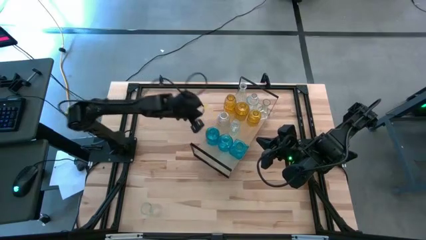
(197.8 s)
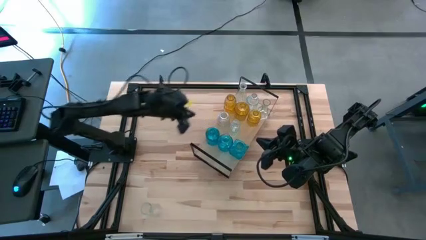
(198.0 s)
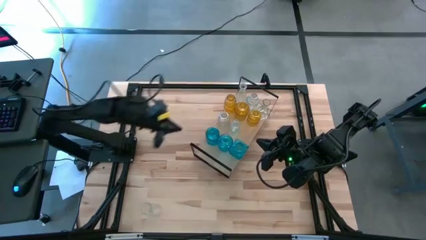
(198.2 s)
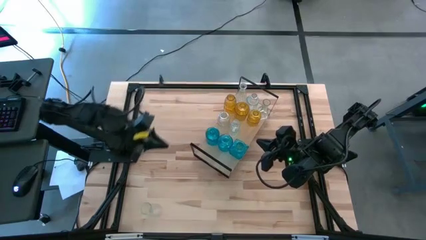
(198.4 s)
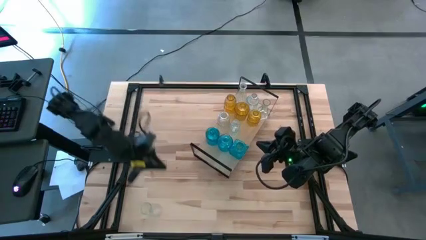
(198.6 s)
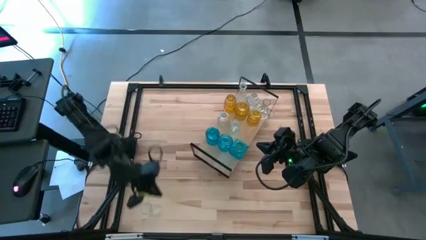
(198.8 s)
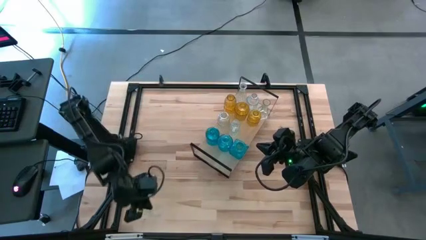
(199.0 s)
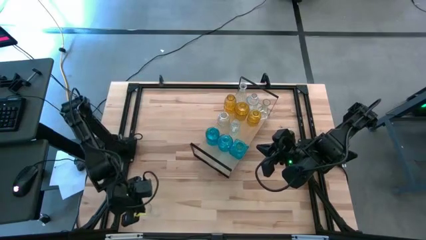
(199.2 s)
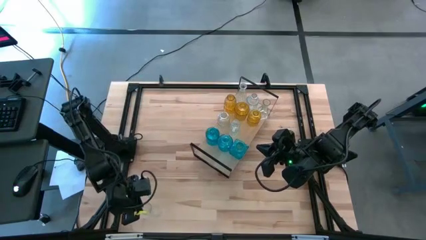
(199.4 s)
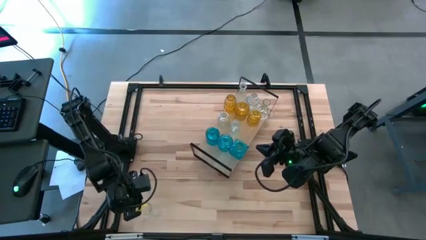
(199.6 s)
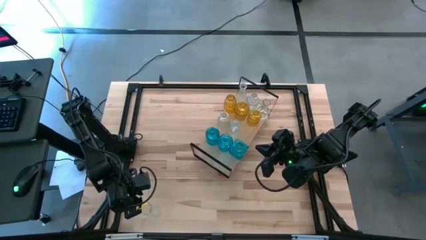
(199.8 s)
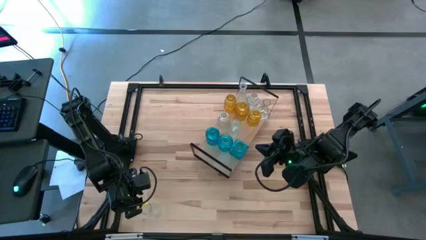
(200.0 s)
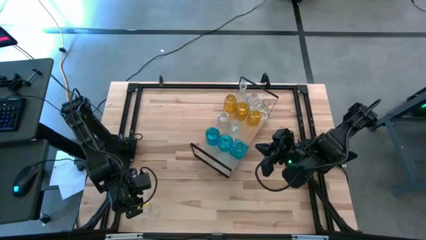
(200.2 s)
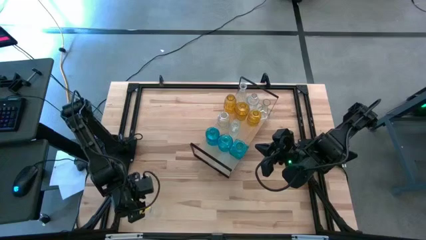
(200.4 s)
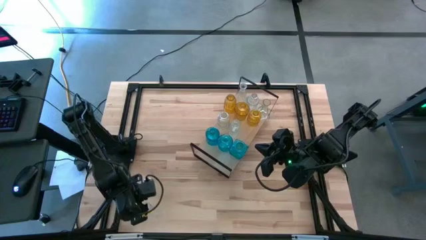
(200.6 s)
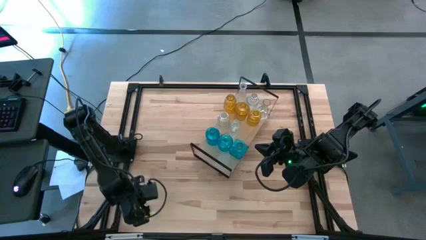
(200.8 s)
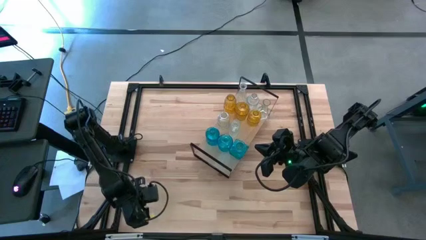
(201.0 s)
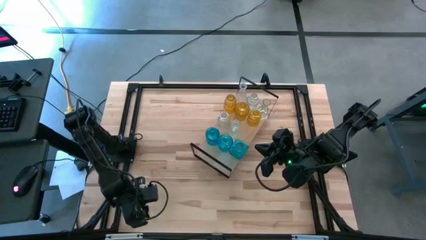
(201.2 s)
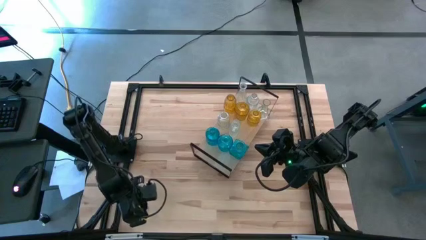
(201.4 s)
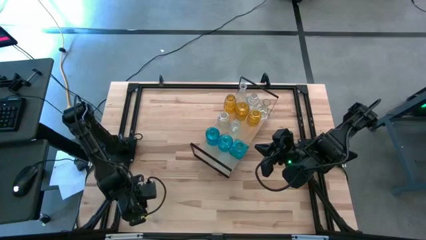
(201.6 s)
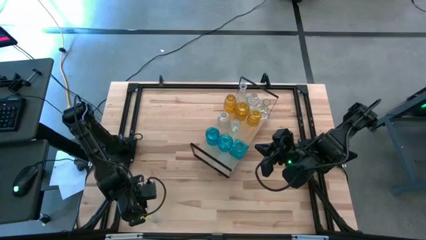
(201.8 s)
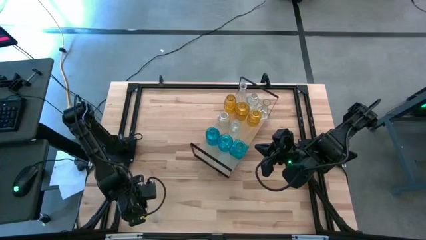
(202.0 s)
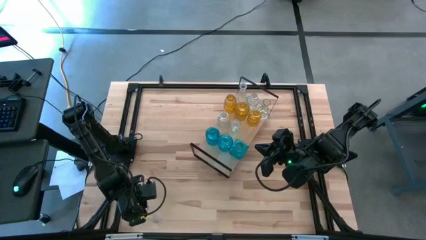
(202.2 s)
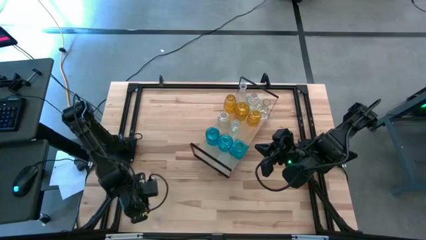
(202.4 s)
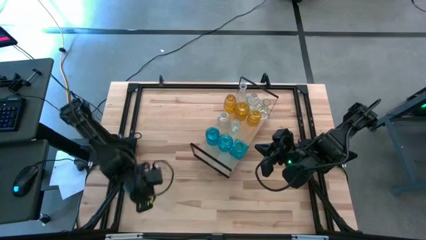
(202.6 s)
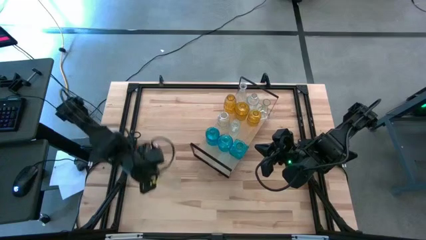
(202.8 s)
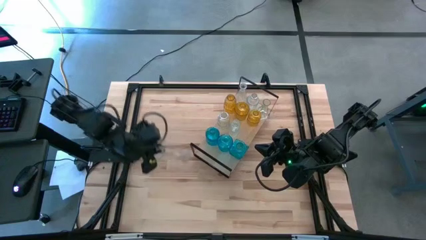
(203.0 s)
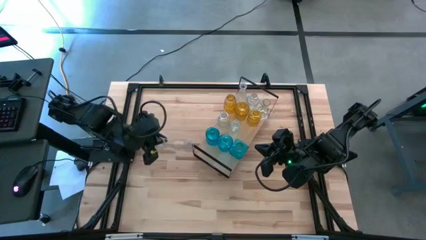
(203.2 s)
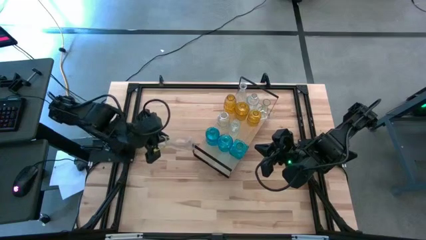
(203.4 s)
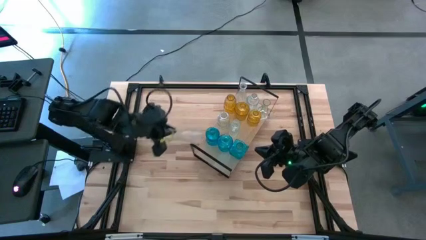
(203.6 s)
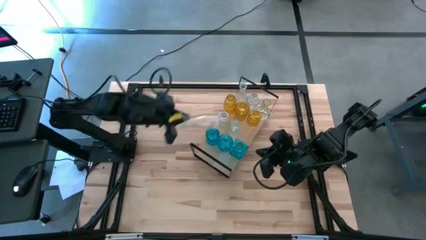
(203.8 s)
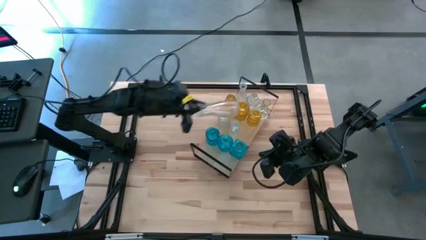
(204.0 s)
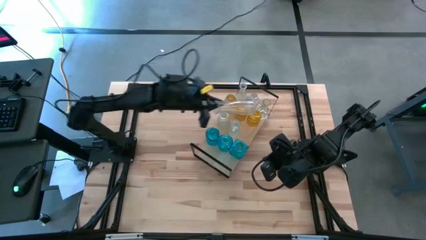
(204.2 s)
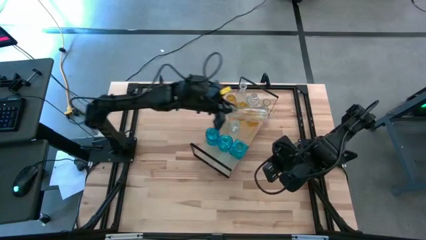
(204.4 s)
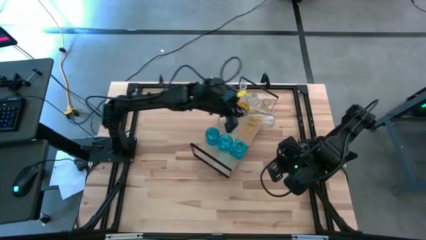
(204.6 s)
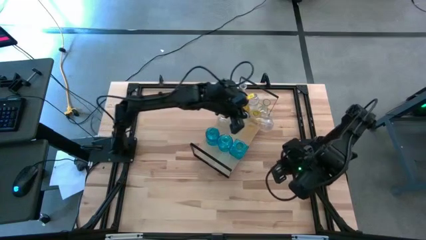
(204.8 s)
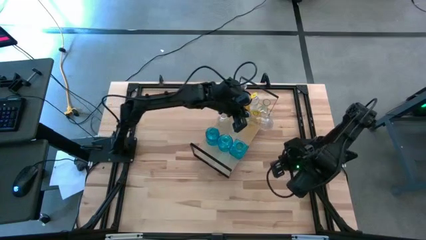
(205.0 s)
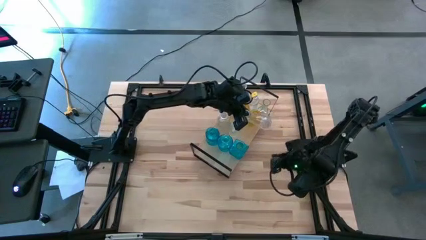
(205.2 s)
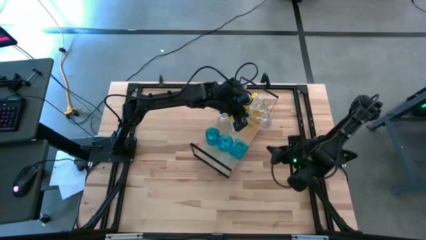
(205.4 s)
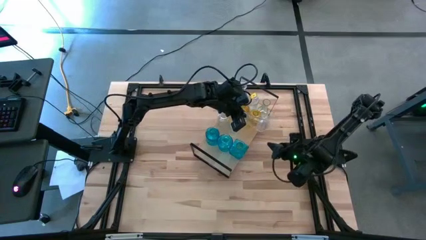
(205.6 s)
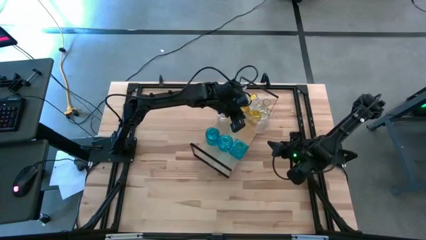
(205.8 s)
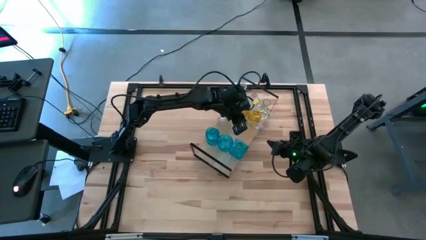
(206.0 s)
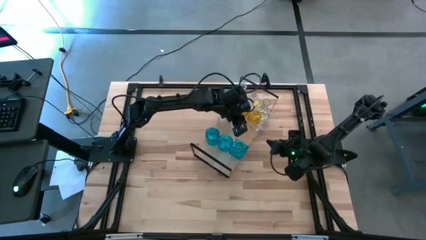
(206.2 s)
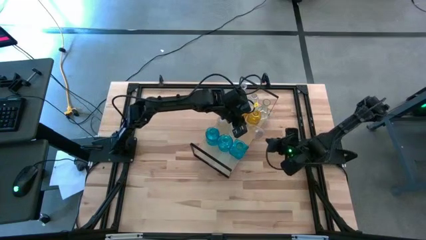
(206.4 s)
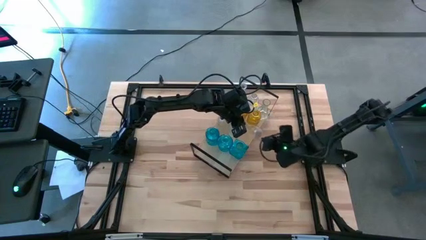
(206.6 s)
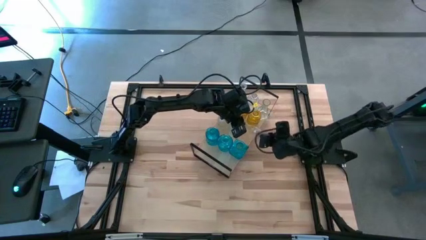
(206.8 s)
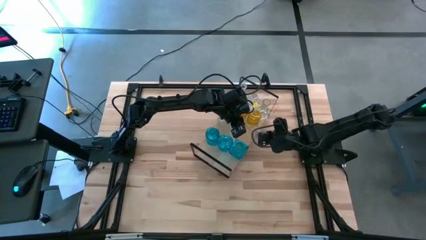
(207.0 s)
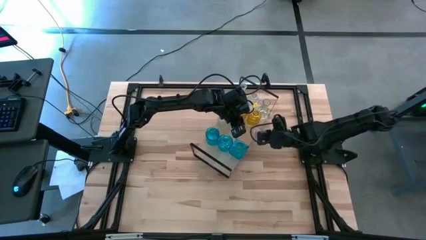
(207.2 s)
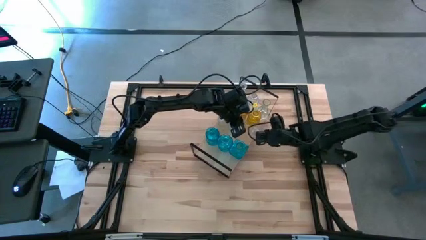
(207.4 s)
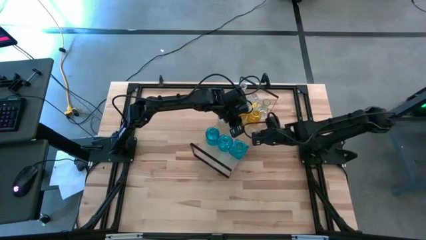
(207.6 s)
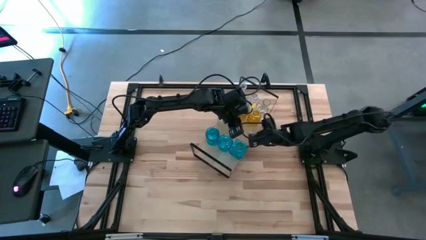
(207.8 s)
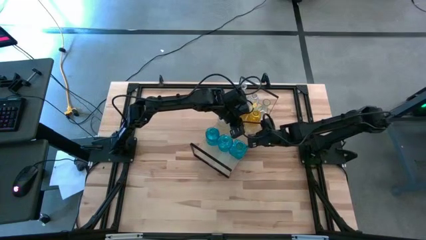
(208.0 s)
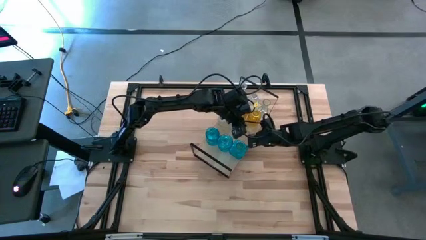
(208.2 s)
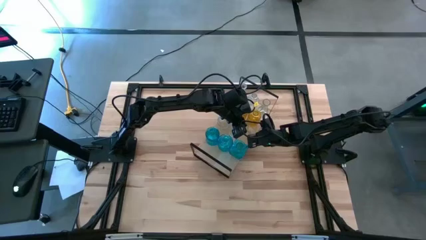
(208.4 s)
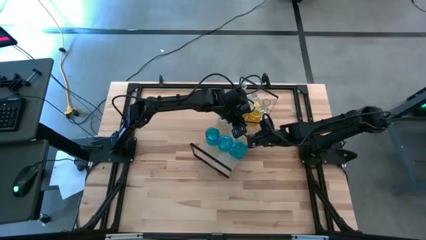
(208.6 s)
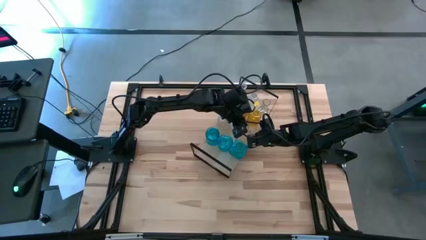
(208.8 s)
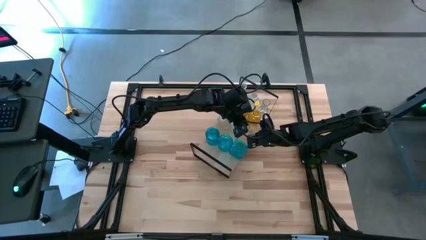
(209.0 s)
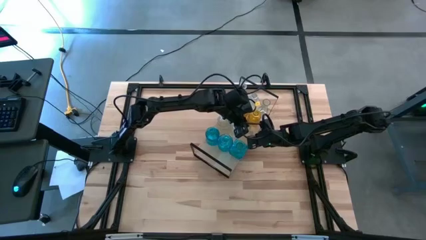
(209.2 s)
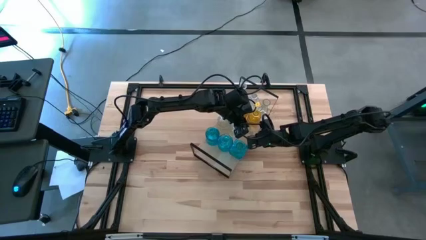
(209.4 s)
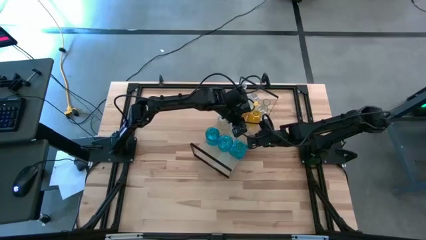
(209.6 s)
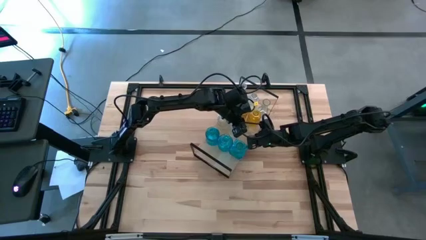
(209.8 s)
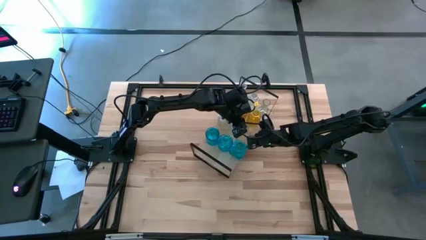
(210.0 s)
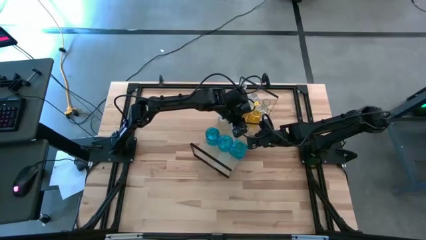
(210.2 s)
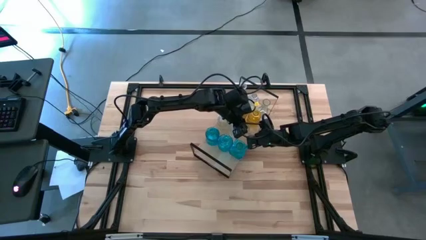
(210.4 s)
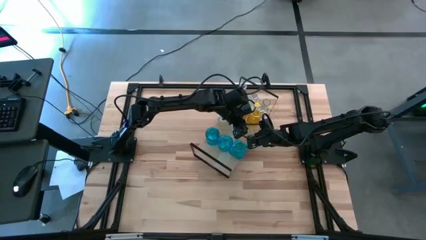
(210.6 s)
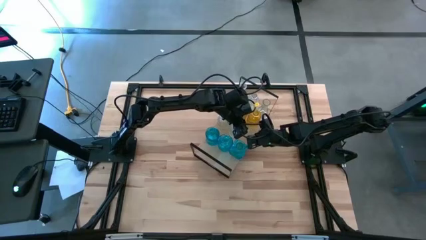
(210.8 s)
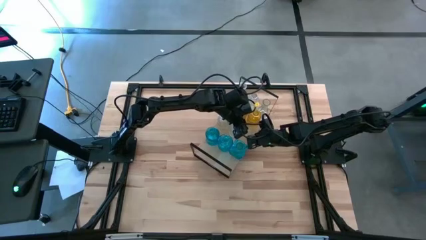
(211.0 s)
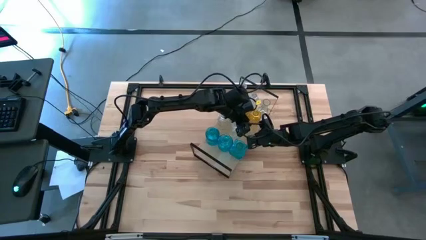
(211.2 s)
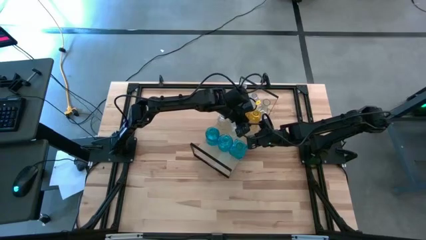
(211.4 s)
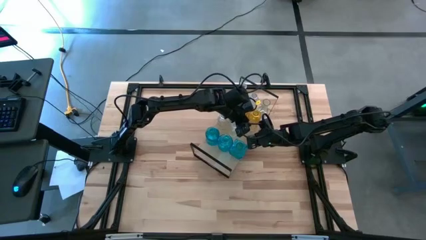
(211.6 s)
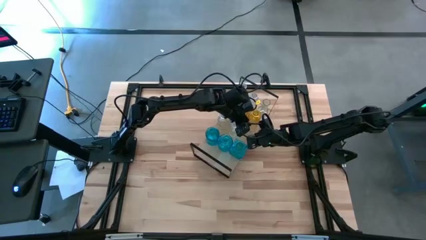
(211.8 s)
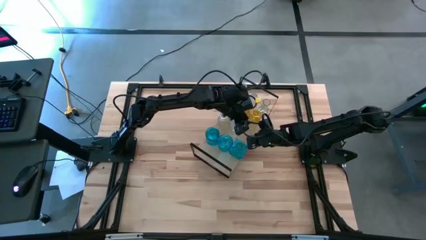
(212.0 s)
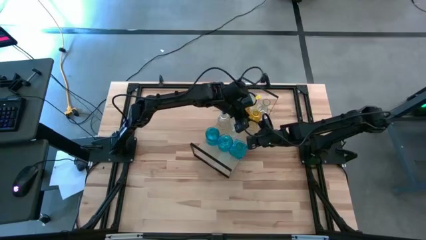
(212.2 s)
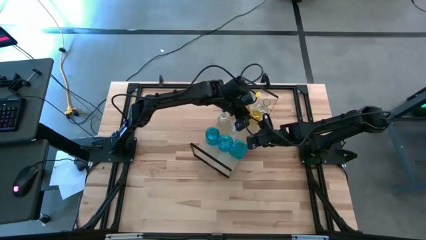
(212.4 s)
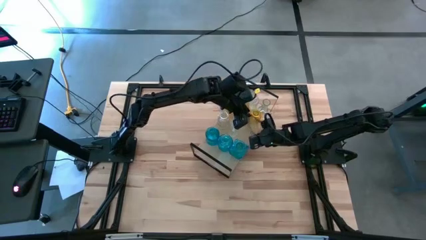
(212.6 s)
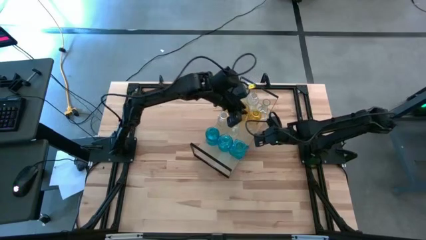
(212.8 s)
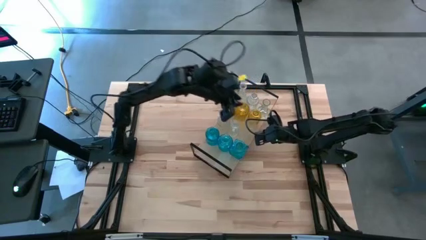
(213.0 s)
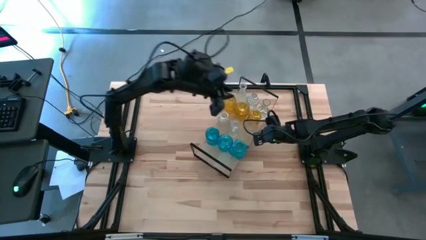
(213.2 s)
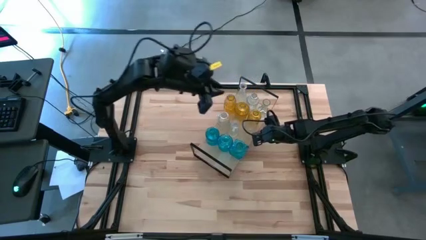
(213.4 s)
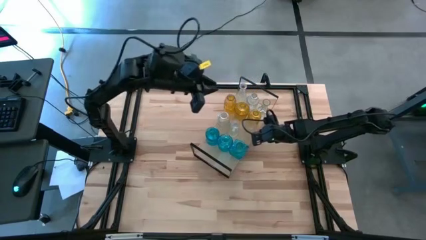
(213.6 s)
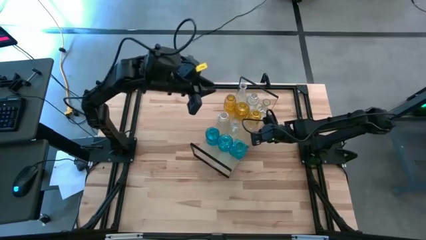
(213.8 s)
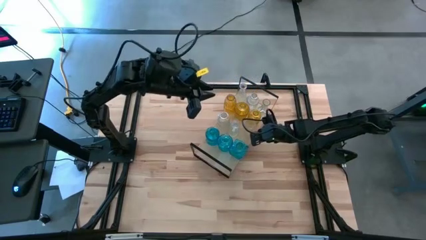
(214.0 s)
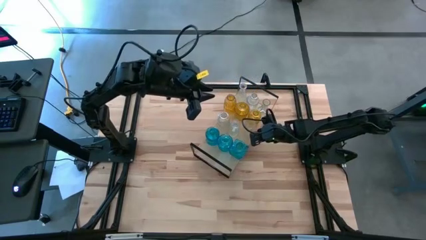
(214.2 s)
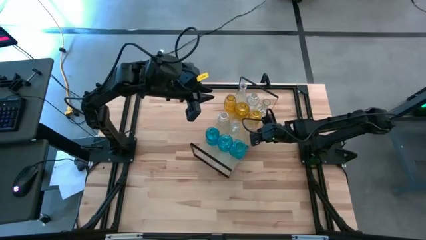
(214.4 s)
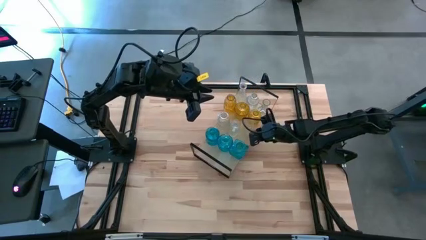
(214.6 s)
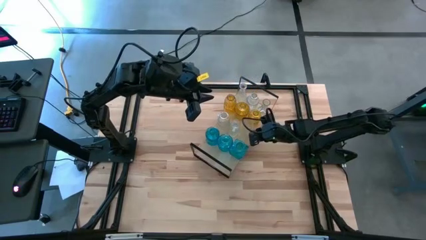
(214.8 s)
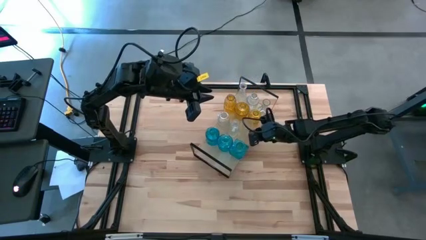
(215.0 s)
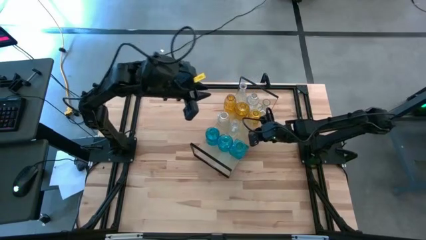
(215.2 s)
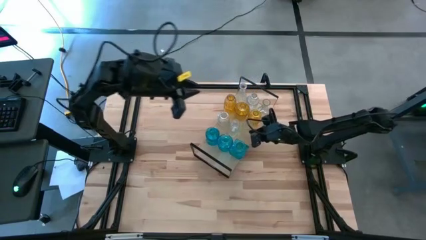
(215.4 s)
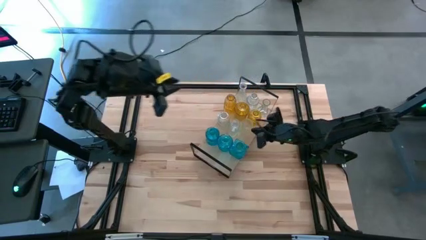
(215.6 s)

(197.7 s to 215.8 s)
Task: sort vases onto shelf
Put the transparent vase on the shelf and align with the other transparent vase
